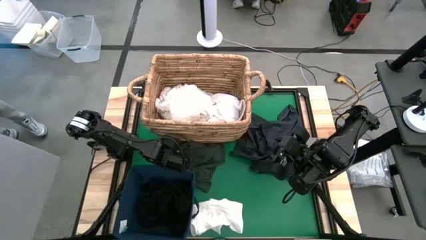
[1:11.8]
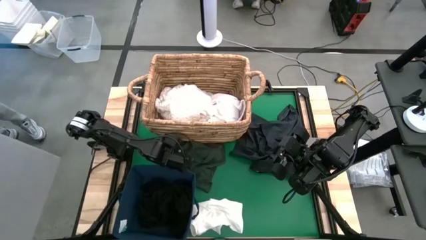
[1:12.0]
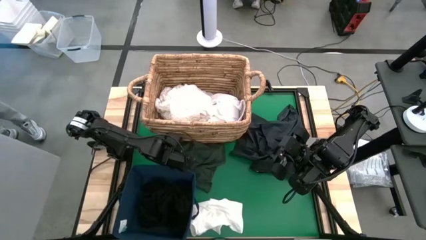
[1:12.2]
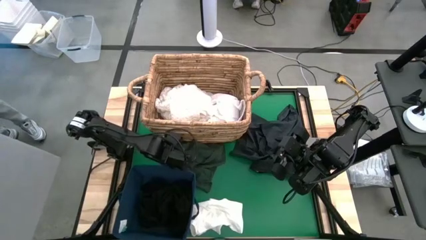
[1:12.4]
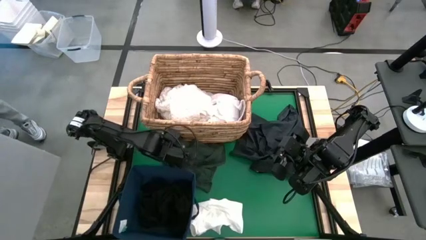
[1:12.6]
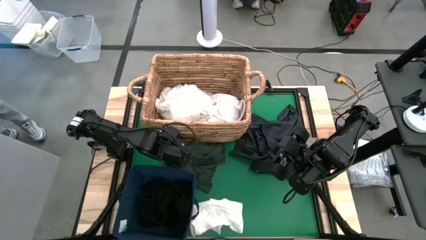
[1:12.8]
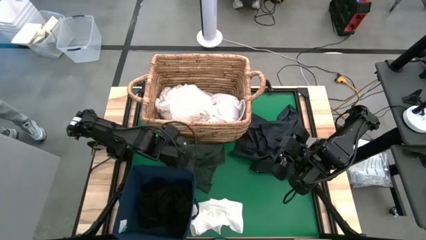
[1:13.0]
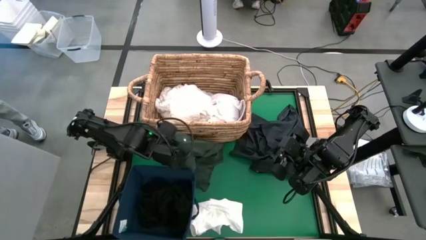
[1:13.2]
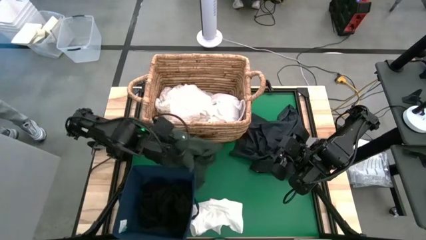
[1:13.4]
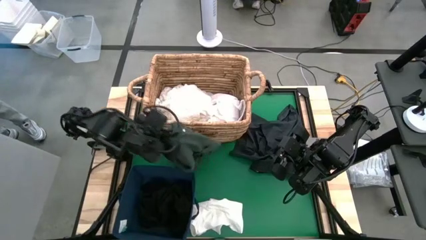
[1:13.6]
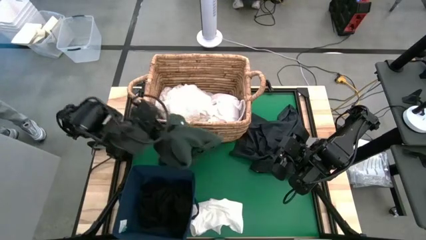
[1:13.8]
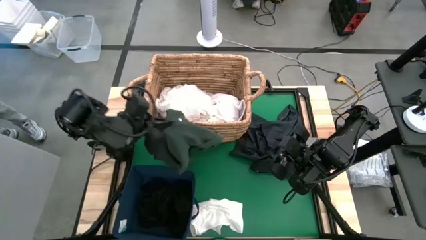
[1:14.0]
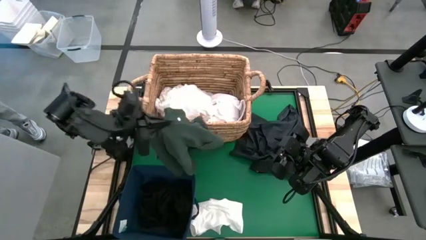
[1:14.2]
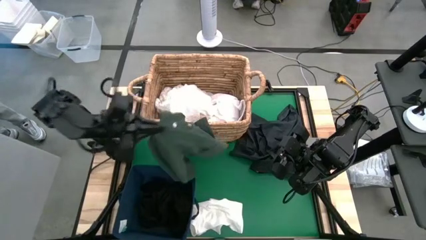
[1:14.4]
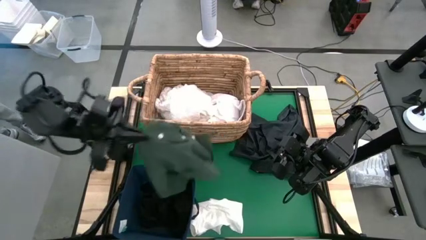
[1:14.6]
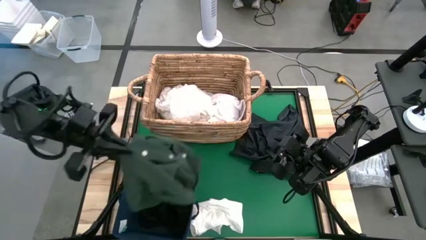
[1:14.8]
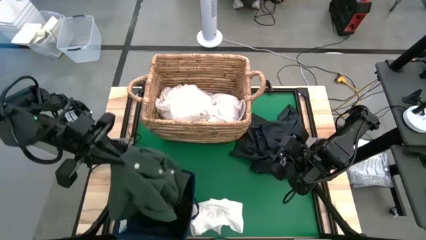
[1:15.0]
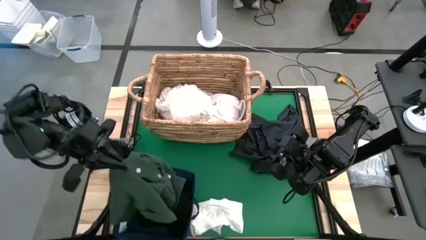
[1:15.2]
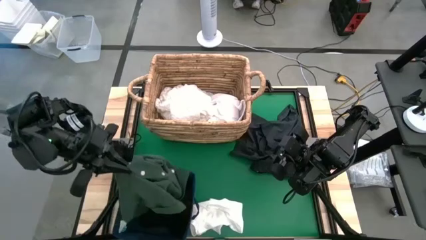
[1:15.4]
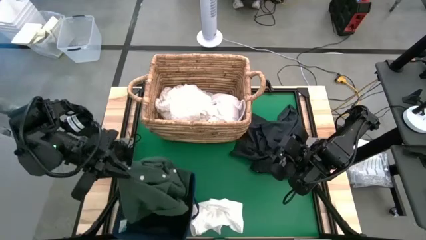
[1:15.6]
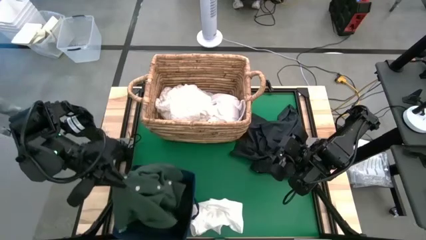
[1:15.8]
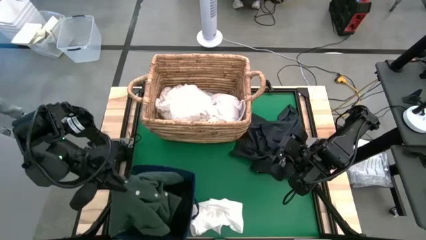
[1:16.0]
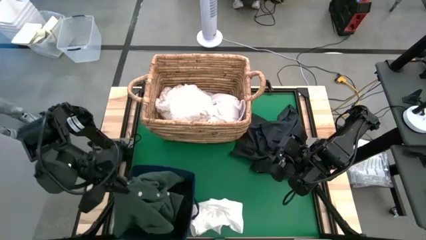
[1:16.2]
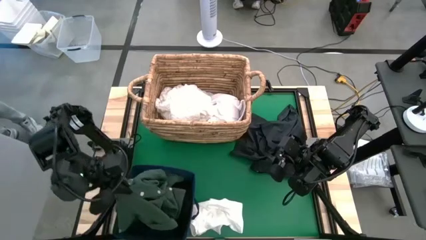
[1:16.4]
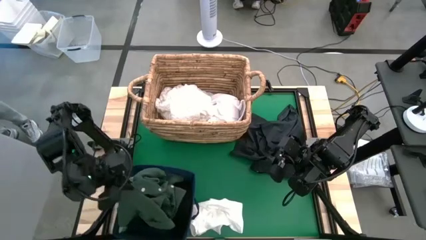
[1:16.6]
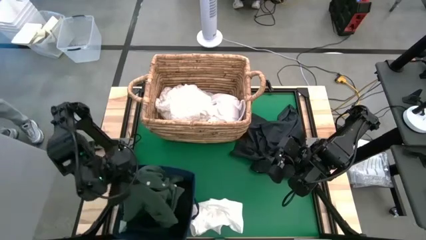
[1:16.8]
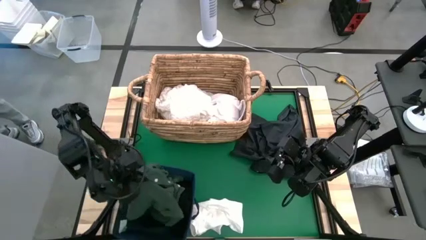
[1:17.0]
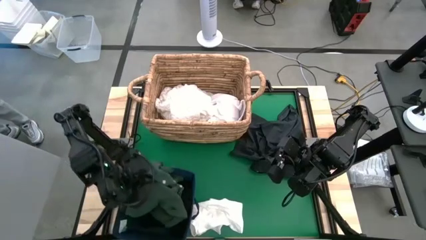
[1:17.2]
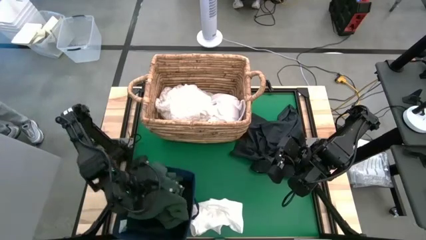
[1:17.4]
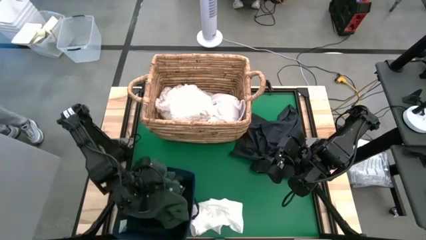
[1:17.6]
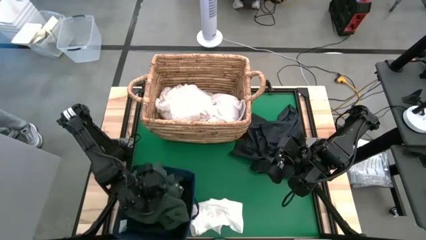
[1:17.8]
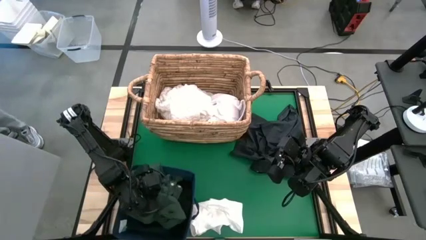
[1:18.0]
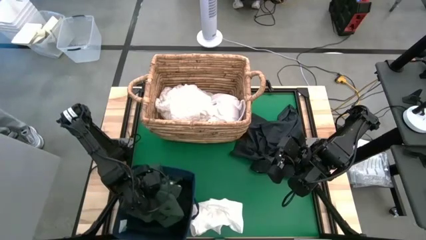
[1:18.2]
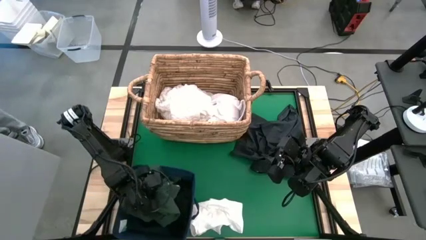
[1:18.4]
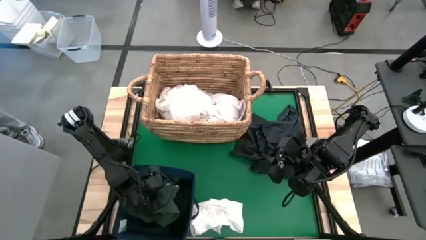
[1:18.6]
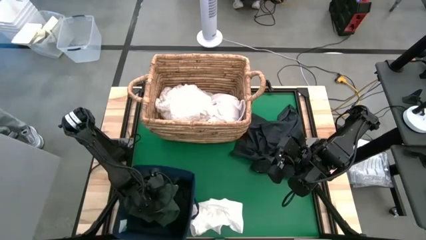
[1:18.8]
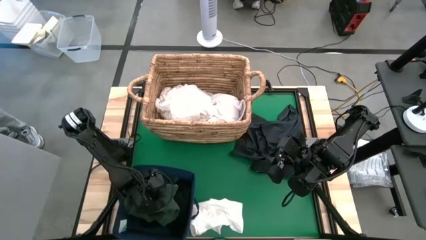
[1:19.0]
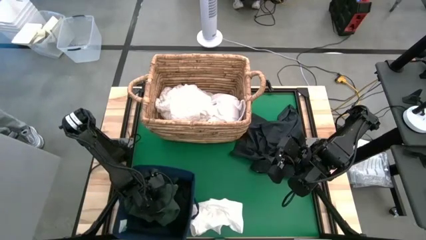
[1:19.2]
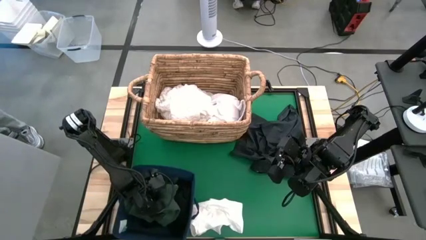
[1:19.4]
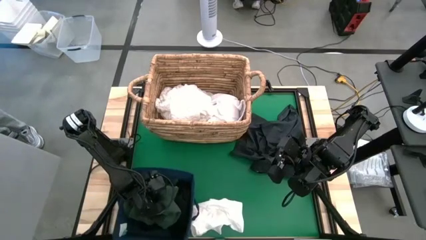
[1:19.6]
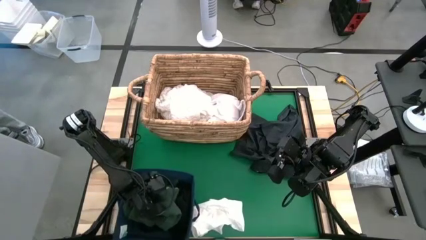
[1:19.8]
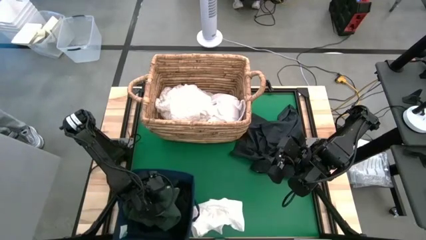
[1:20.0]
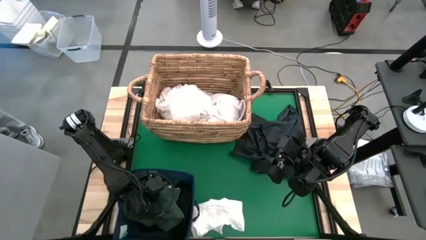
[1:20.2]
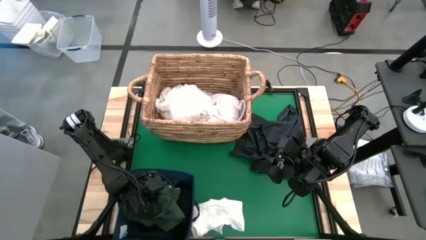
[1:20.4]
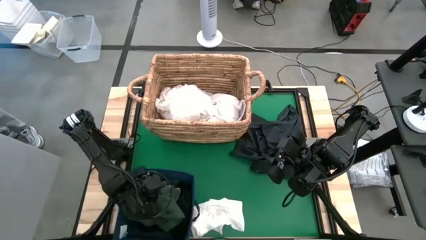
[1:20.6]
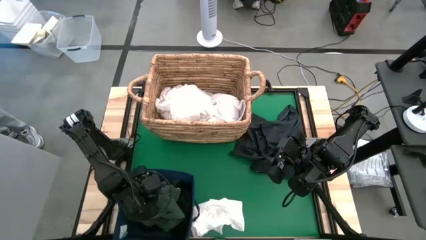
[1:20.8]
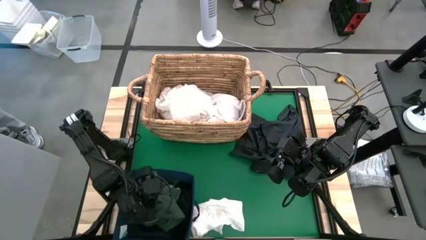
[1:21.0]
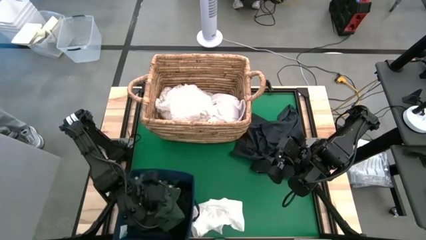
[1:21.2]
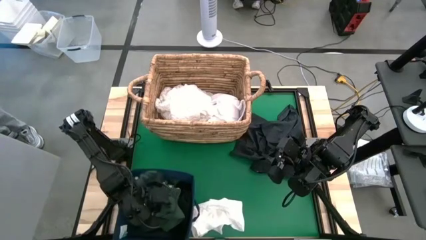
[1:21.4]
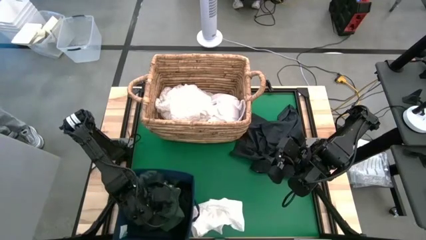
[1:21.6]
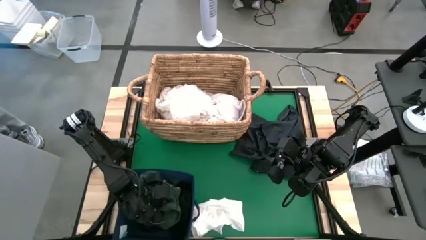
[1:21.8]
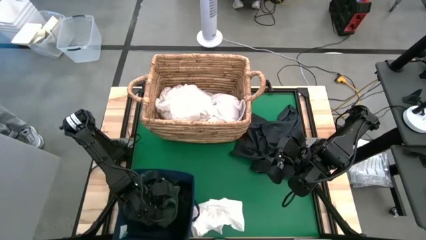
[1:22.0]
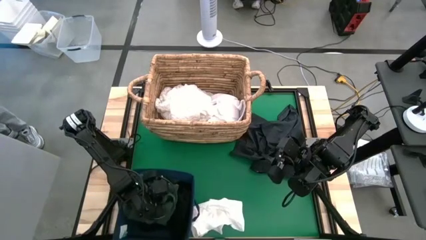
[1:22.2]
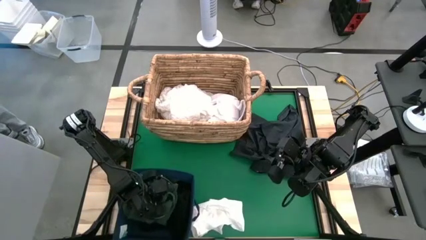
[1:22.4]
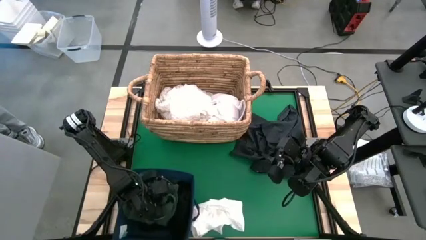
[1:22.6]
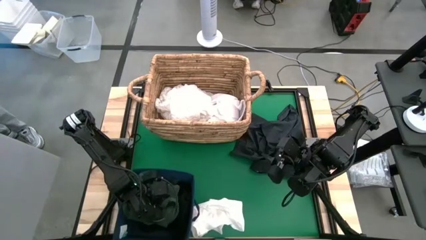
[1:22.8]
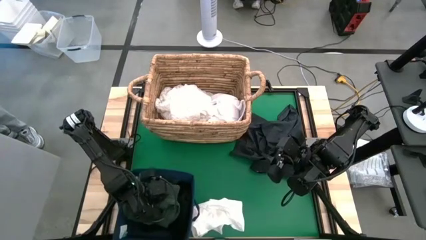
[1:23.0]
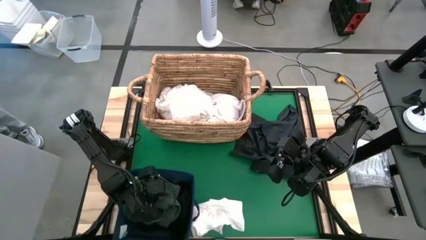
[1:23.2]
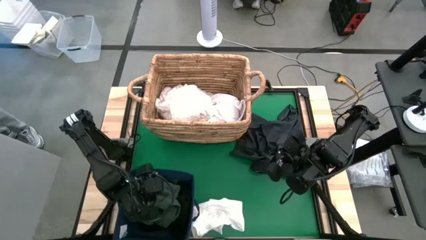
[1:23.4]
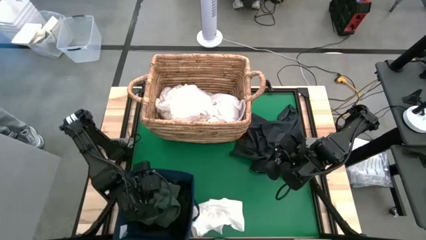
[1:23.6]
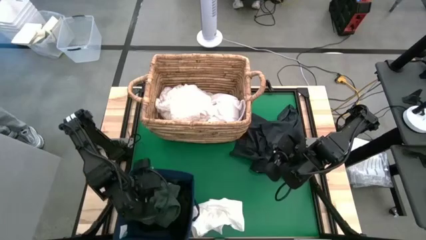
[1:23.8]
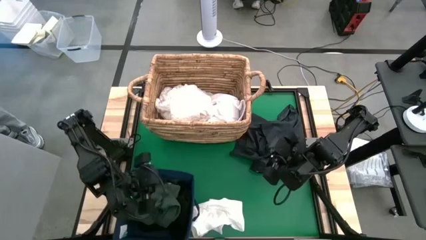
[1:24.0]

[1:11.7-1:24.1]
Put the green shirt into the laundry bin

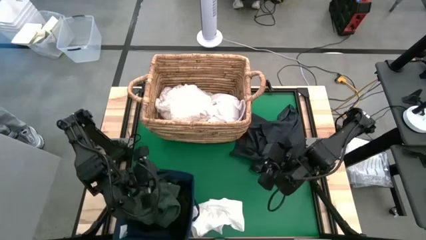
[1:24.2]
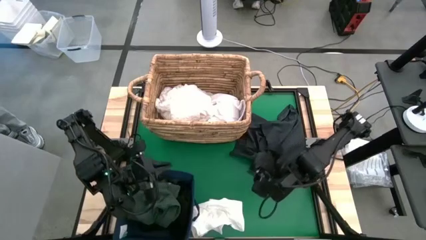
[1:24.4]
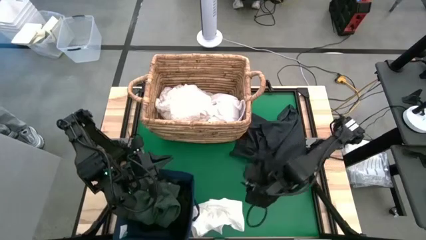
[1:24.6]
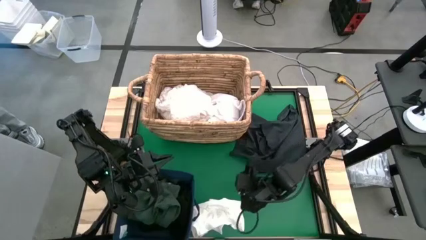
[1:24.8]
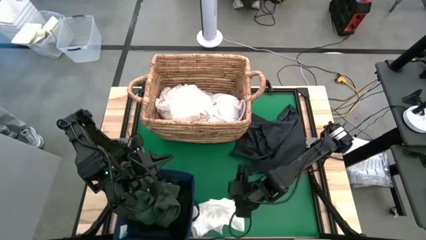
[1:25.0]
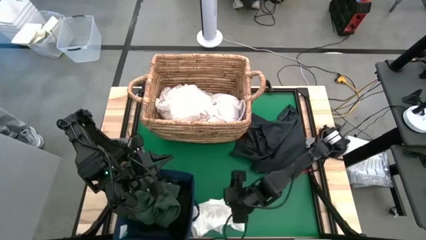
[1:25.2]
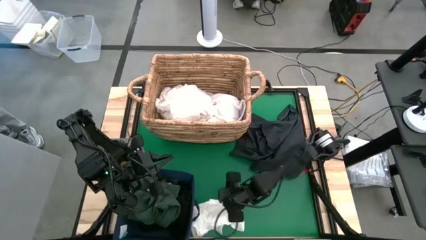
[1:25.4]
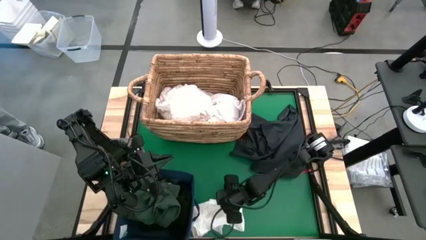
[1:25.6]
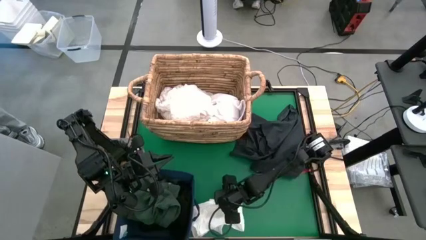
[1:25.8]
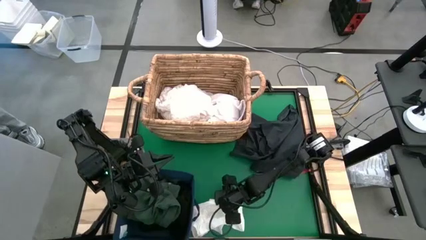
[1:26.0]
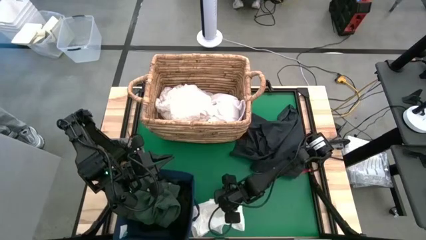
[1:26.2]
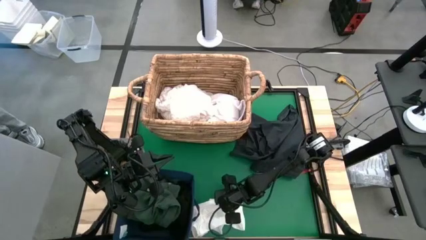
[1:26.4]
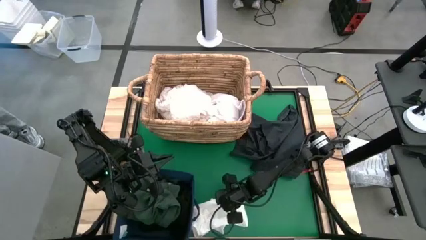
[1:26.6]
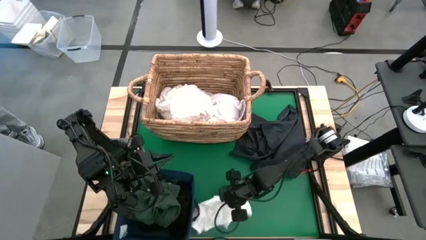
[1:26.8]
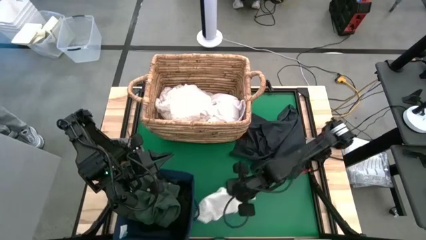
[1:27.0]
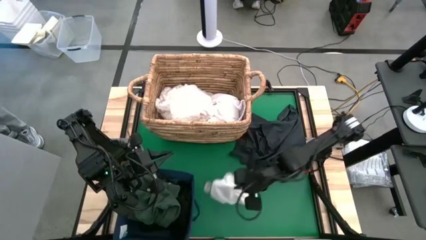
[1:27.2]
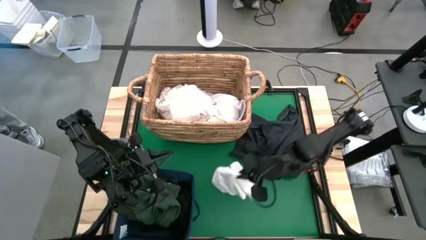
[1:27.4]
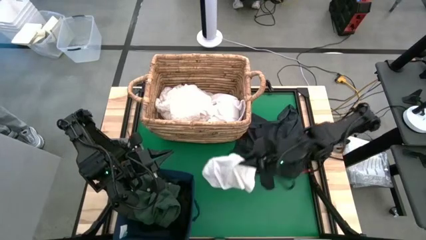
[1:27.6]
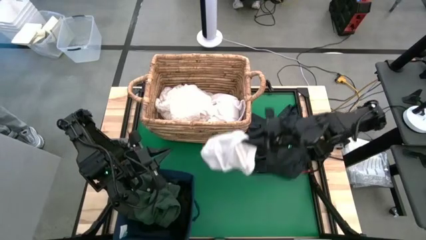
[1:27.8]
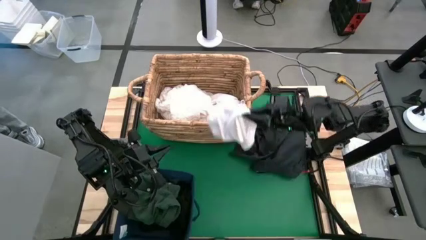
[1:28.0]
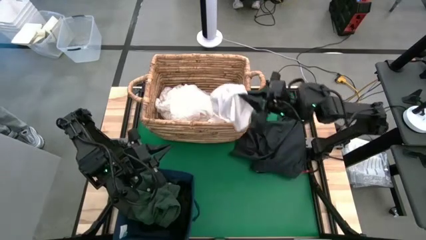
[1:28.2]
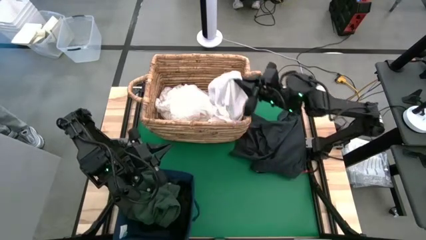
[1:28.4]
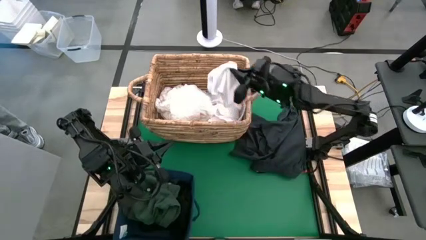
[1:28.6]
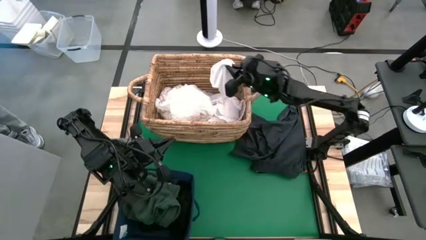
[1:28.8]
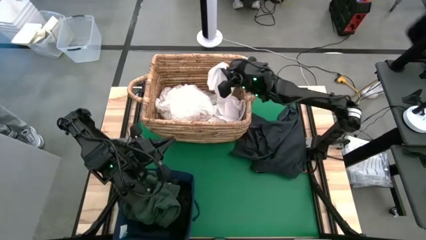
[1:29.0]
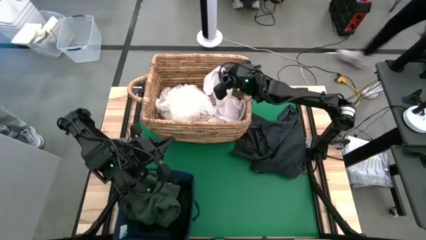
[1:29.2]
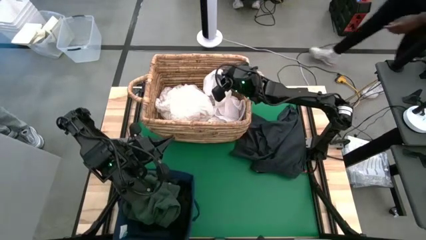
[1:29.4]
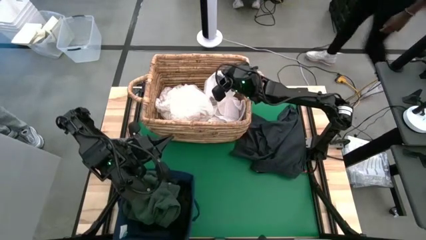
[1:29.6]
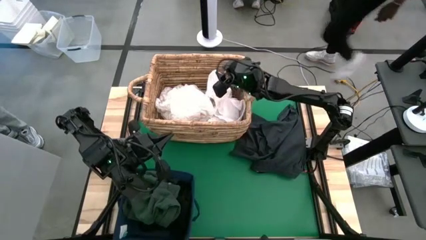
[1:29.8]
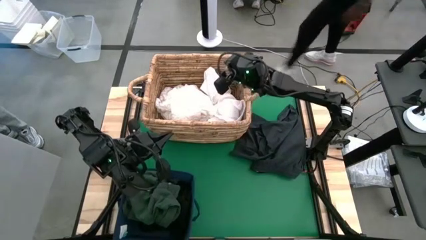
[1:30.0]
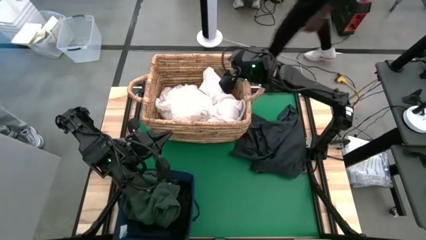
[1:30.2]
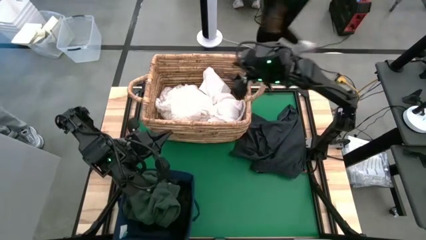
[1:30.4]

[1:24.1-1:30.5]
Put the white shorts into the laundry basket
